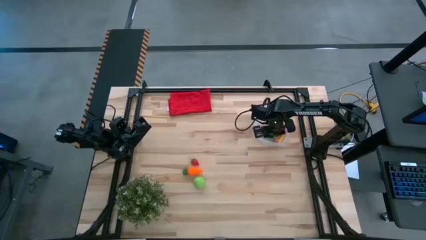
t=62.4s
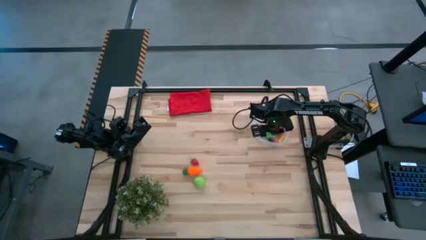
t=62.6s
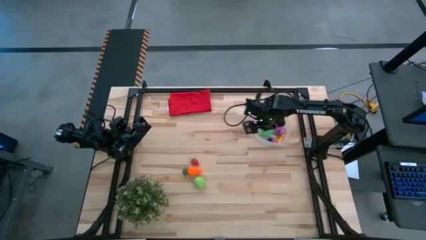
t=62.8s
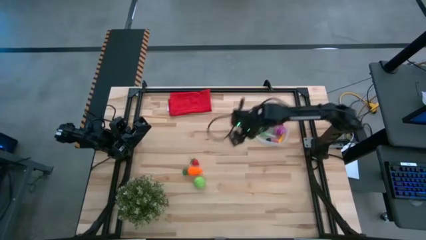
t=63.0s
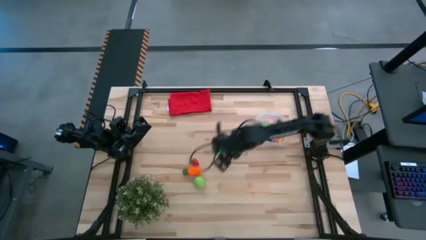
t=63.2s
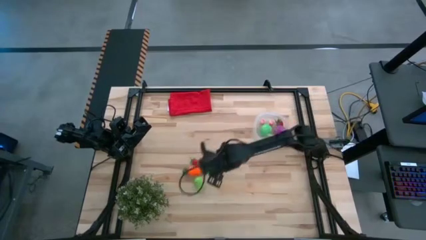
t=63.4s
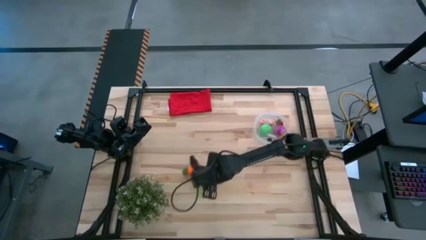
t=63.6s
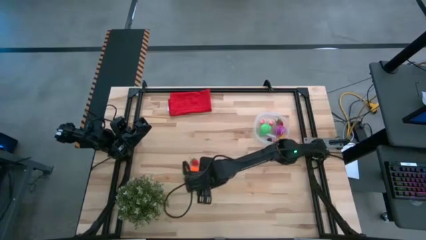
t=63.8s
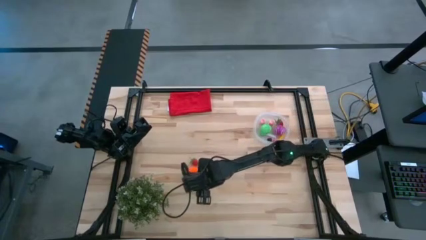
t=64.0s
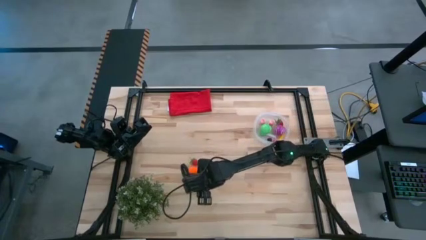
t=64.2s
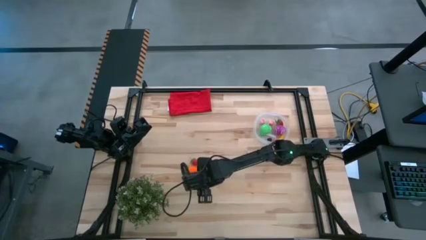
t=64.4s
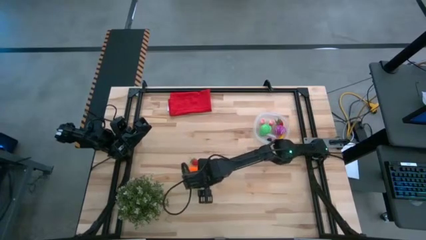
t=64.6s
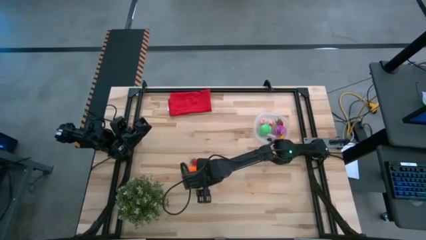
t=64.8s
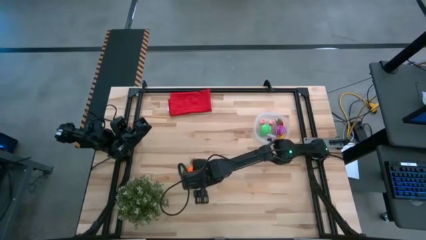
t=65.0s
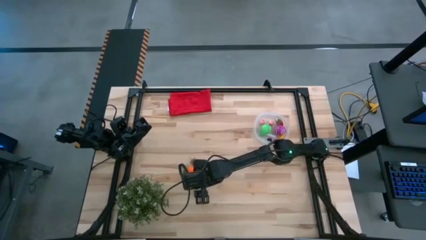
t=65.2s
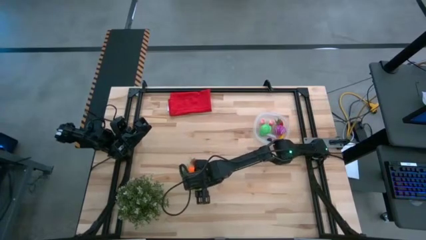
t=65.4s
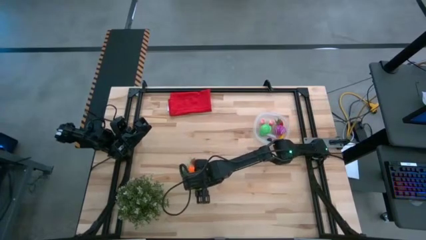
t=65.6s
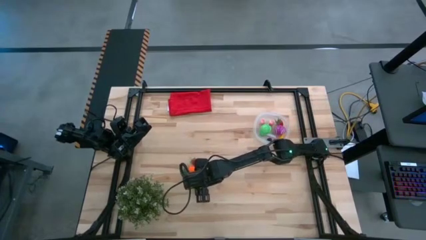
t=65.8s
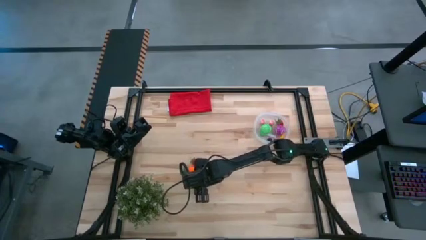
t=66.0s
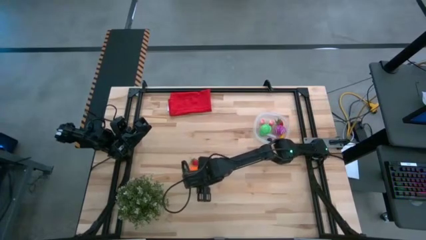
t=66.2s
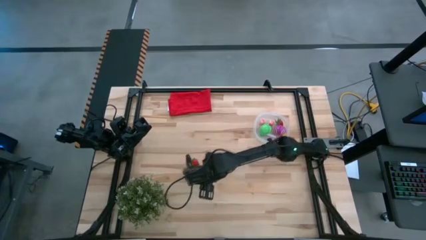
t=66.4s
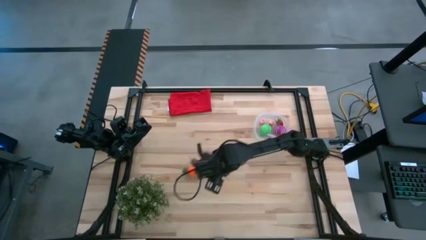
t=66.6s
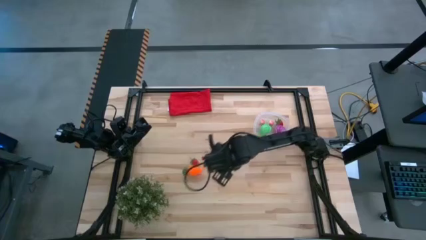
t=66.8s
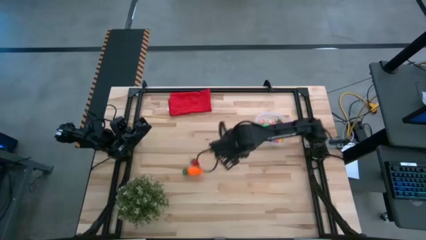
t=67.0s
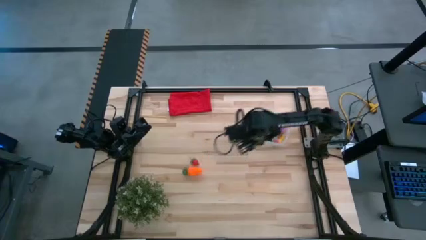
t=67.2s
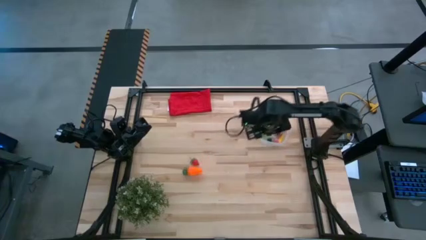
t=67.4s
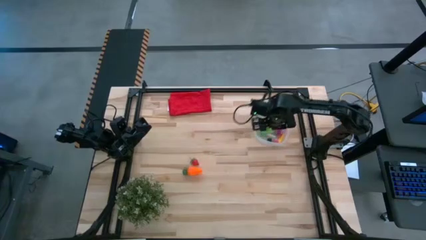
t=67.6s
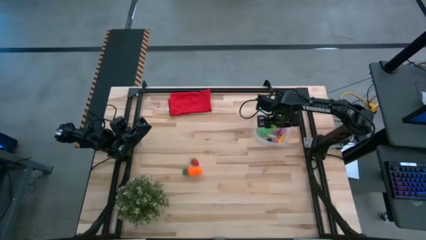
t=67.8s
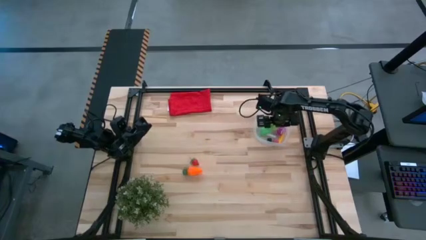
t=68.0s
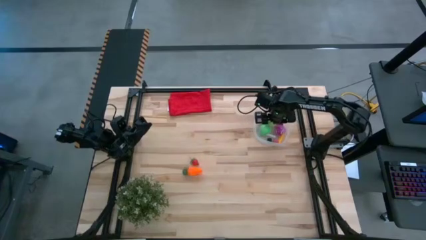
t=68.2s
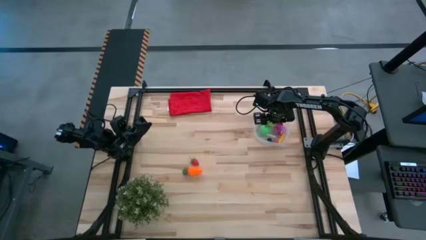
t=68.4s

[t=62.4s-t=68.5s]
Task: Pick and placing Produce into tupperware
Put the green cabbage into the transparent container

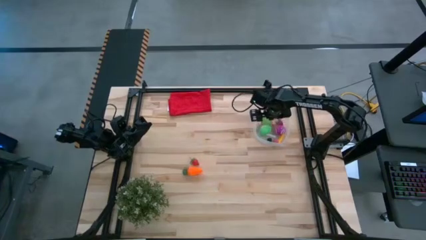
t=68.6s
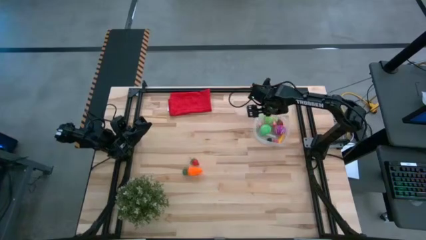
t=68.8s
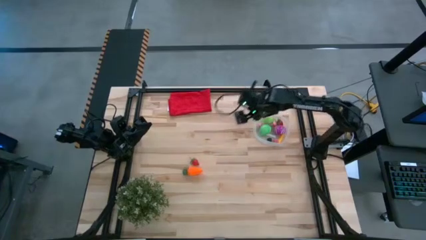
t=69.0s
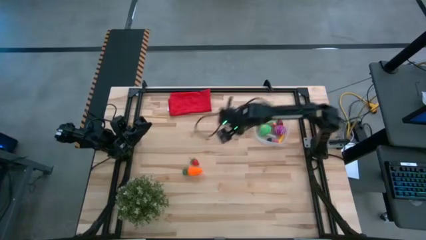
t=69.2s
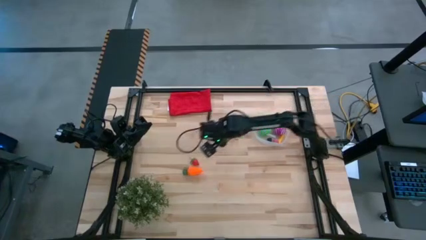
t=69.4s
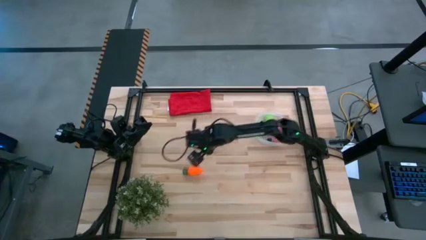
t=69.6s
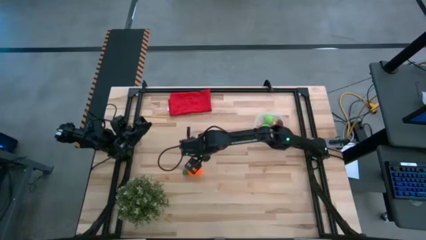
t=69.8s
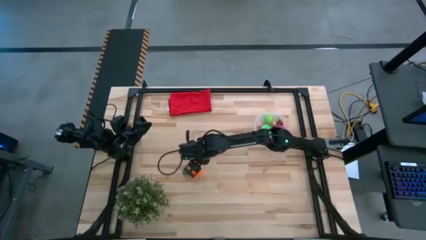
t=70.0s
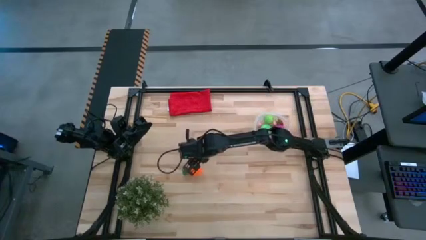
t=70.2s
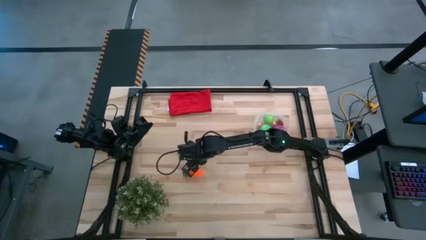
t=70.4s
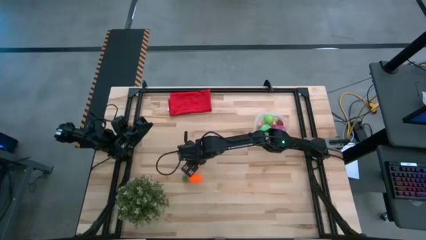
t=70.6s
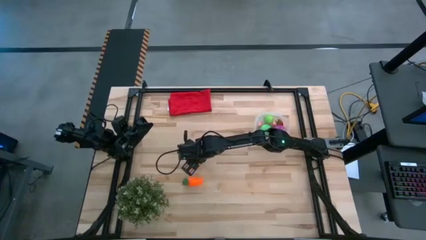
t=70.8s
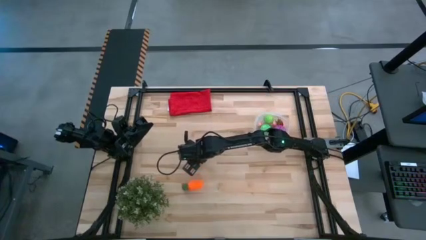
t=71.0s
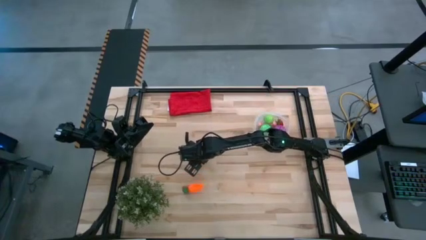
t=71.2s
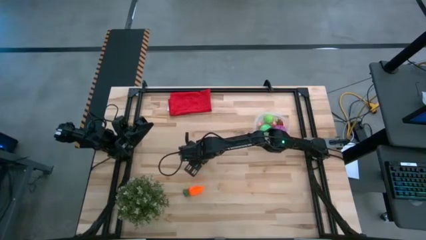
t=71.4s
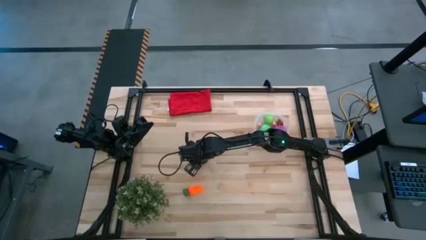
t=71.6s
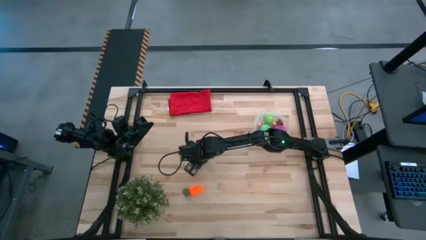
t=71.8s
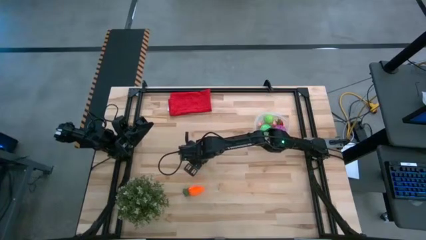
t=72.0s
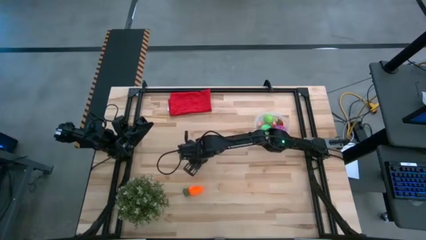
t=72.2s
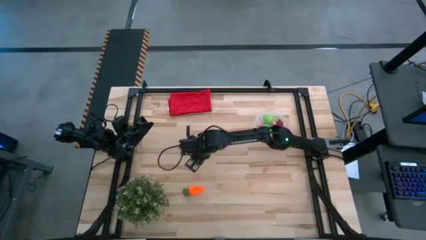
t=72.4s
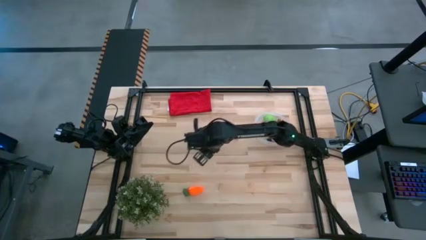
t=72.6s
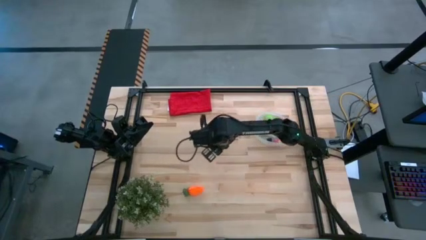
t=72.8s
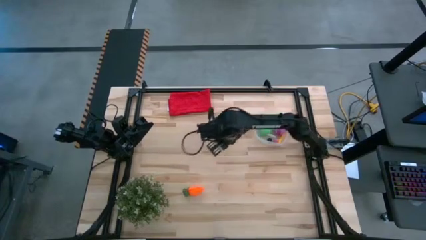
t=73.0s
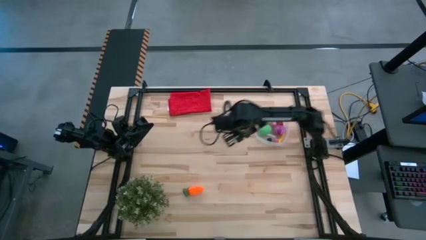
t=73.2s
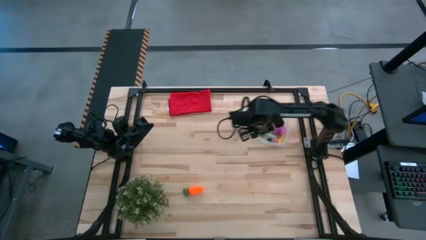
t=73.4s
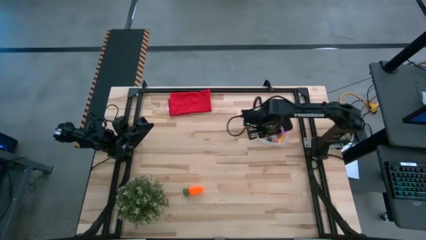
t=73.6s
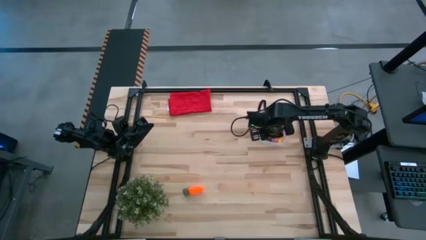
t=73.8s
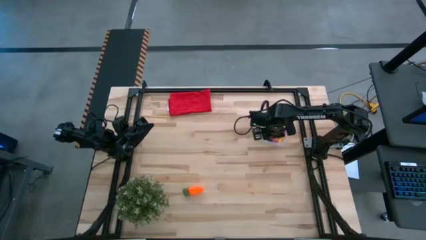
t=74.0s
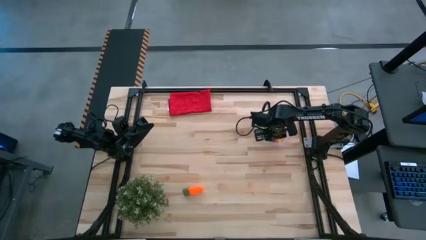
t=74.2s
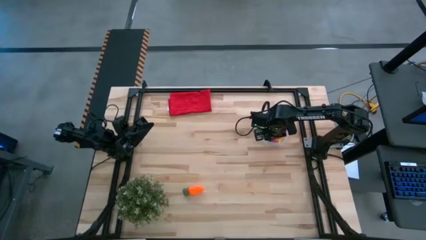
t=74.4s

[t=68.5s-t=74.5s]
Put the red strawberry into the transparent container

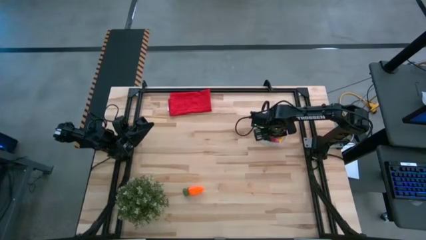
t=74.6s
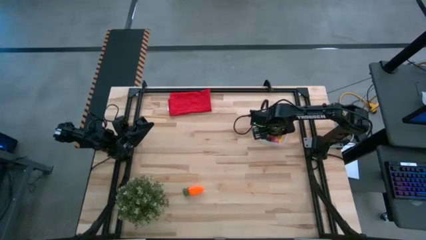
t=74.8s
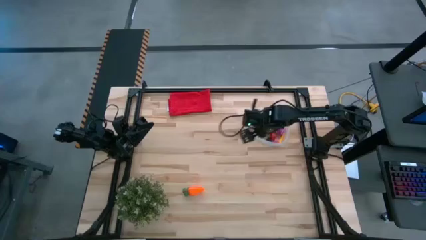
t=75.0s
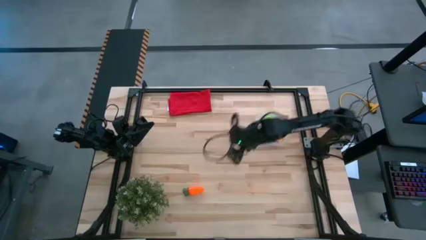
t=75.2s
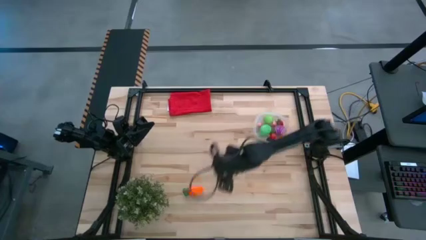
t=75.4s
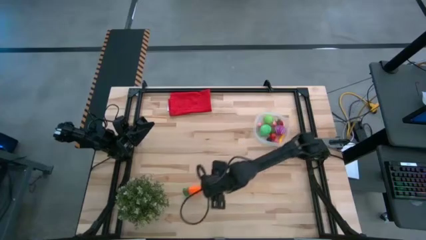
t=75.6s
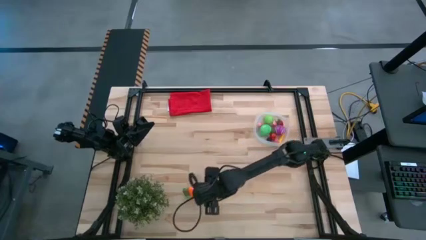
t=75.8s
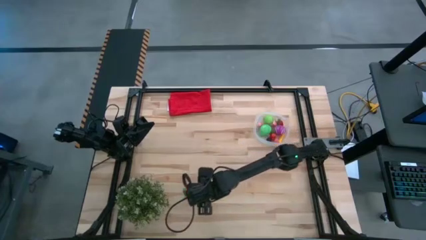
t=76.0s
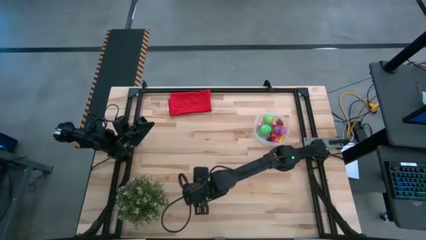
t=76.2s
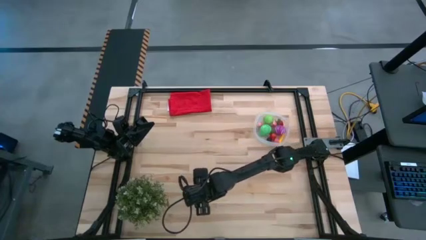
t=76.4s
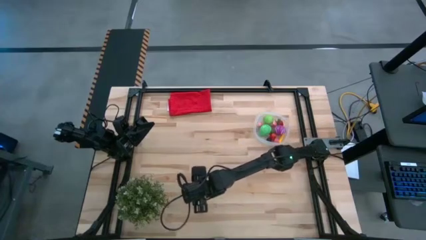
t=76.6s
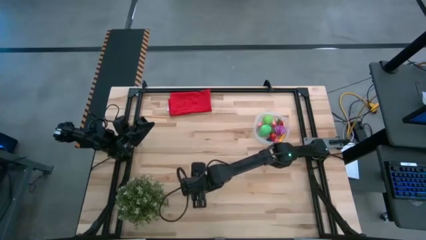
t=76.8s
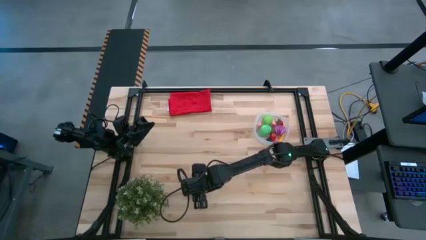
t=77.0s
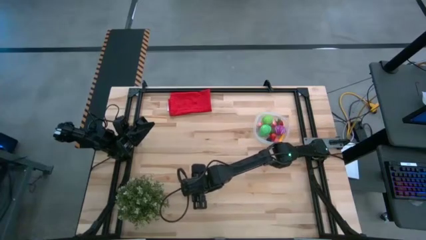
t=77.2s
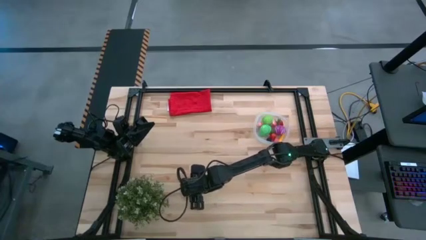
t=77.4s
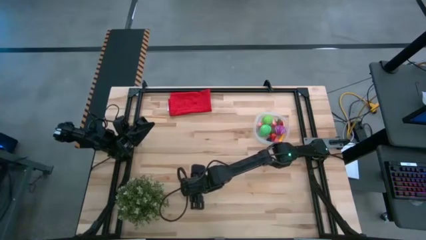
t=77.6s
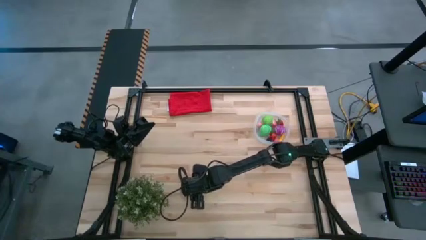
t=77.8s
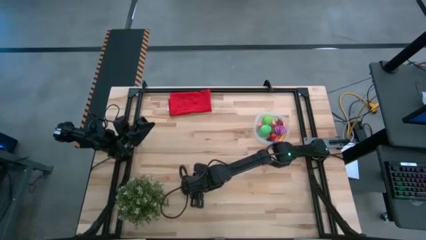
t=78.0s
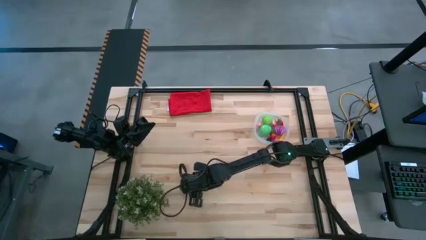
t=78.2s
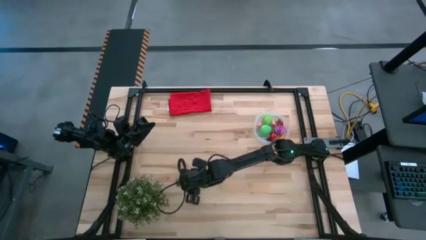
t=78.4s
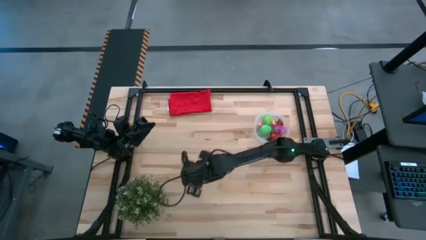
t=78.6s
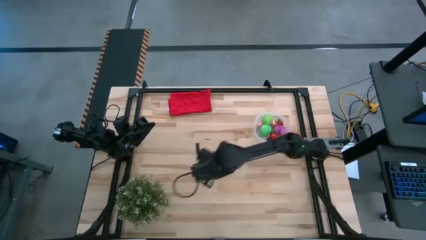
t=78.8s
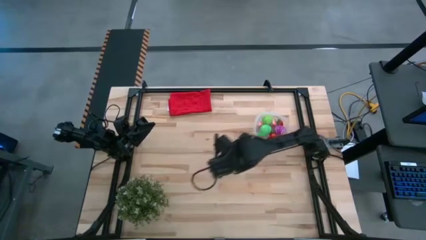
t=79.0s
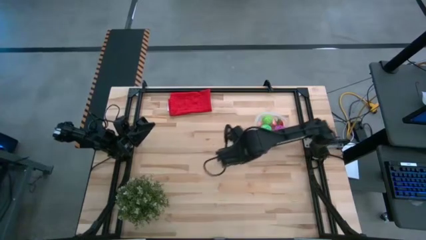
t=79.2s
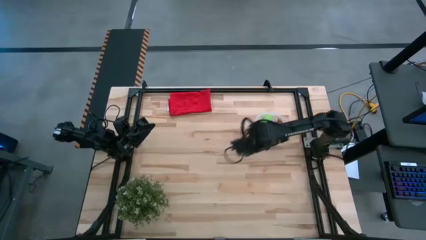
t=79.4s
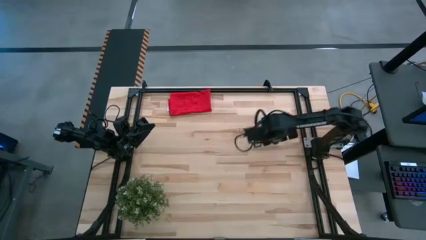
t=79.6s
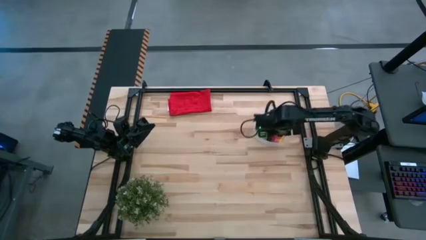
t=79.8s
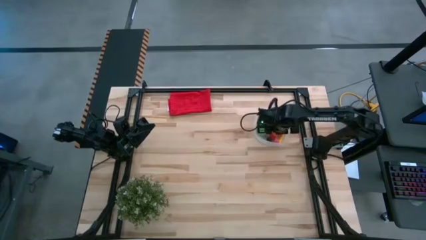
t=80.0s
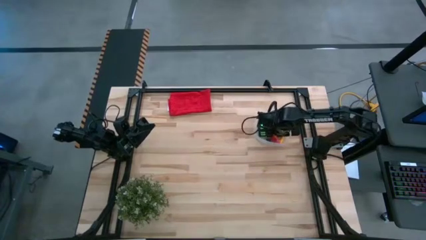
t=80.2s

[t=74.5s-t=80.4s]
Put the orange carrot into the transparent container
